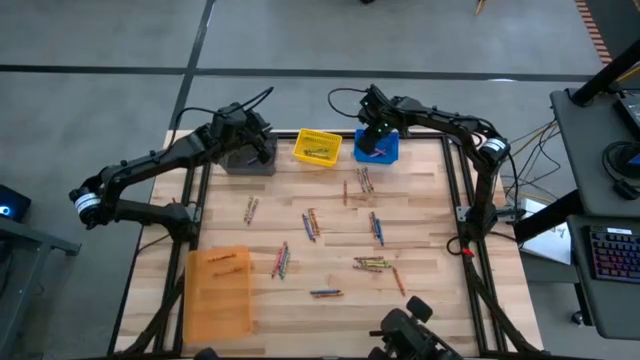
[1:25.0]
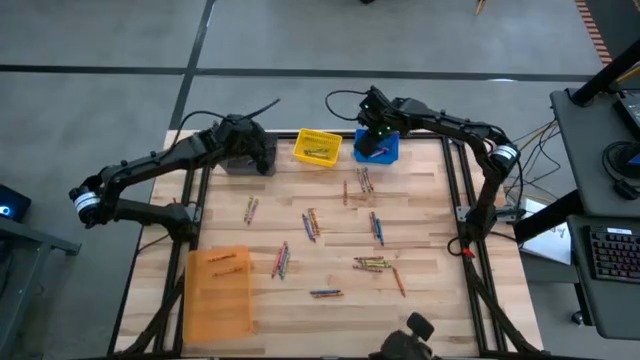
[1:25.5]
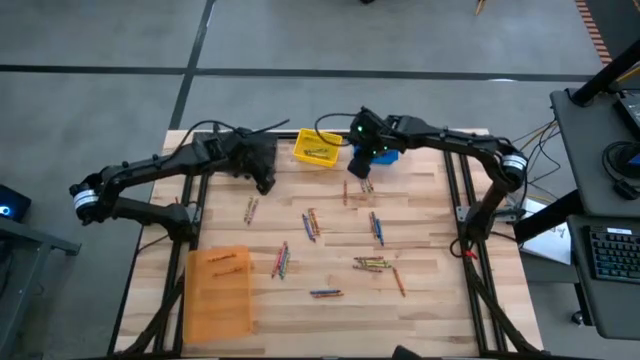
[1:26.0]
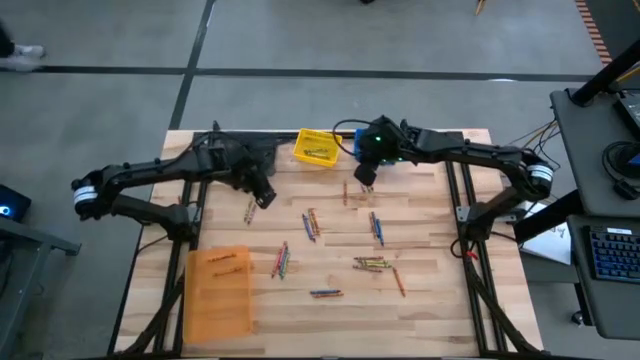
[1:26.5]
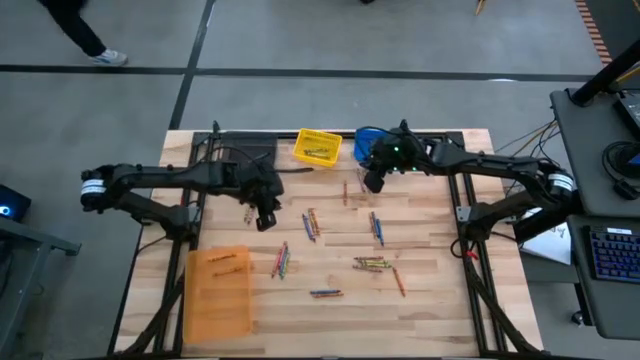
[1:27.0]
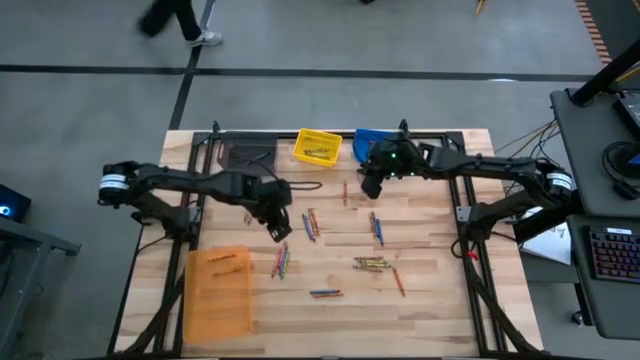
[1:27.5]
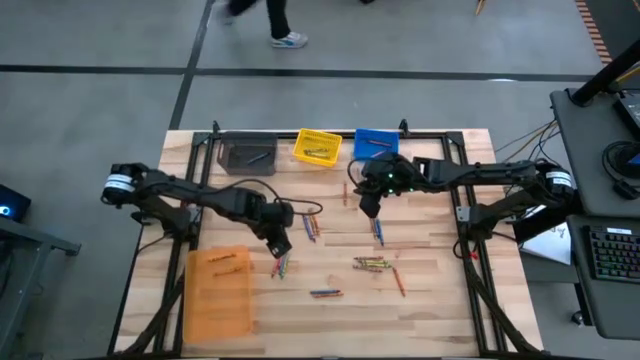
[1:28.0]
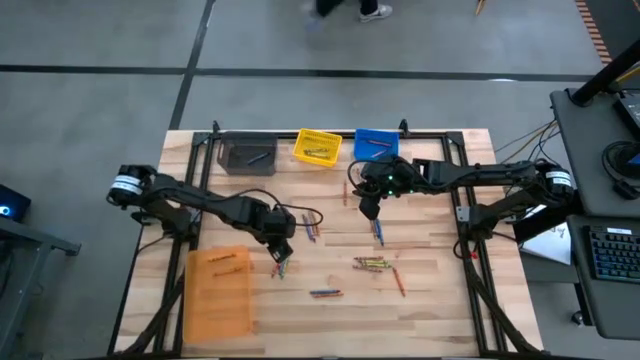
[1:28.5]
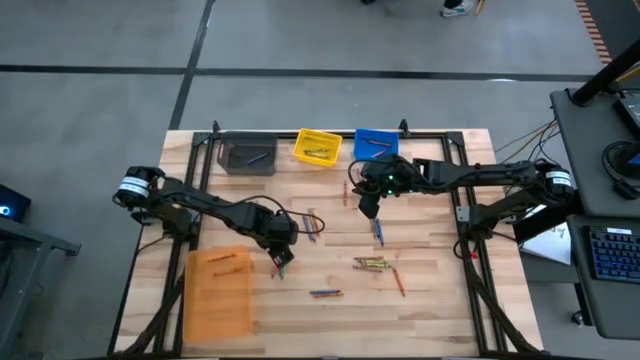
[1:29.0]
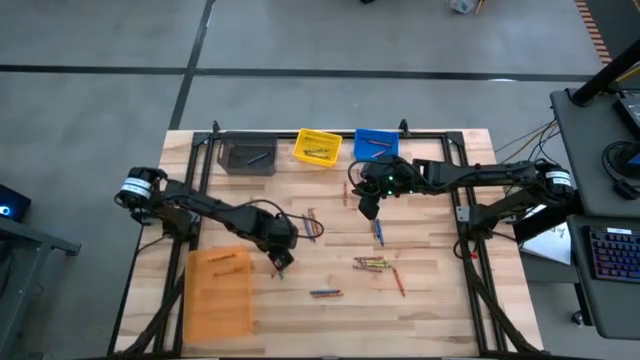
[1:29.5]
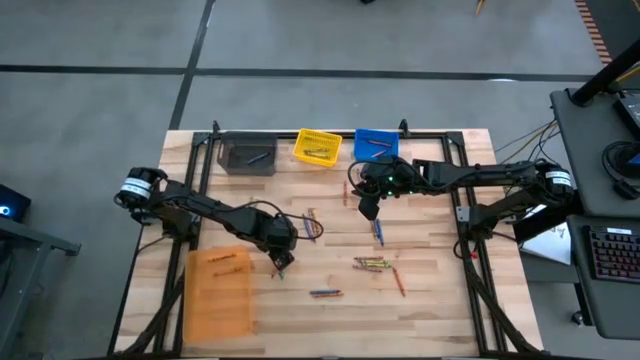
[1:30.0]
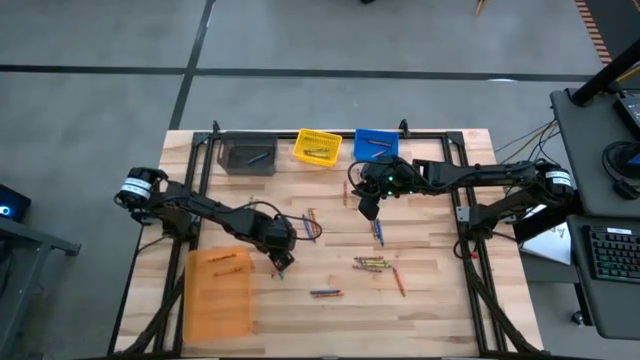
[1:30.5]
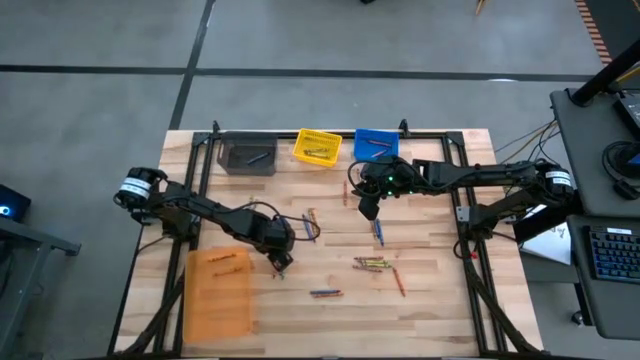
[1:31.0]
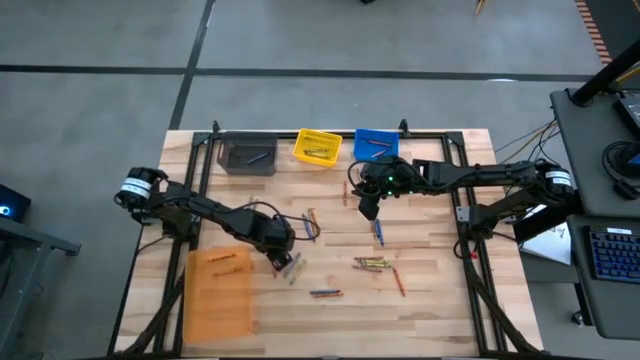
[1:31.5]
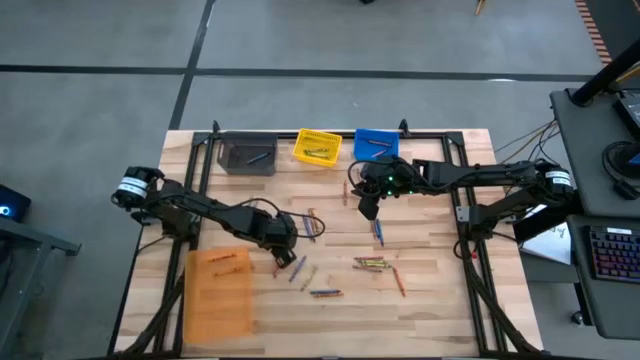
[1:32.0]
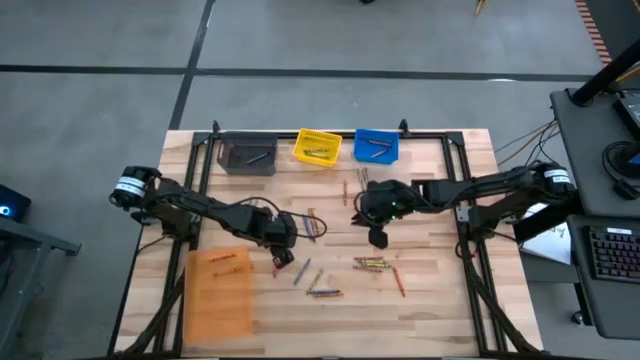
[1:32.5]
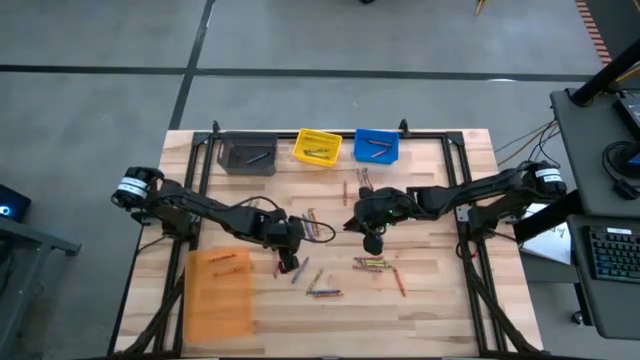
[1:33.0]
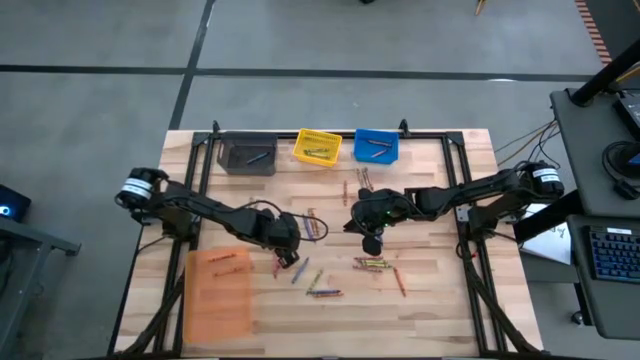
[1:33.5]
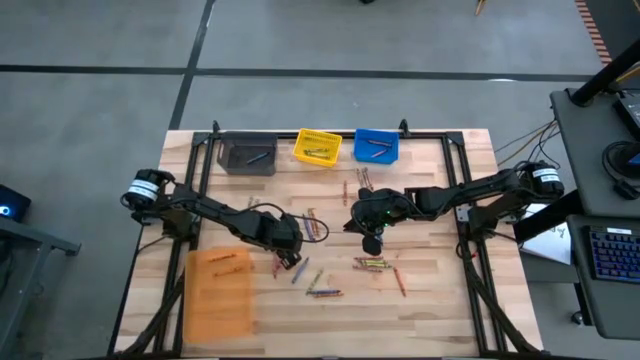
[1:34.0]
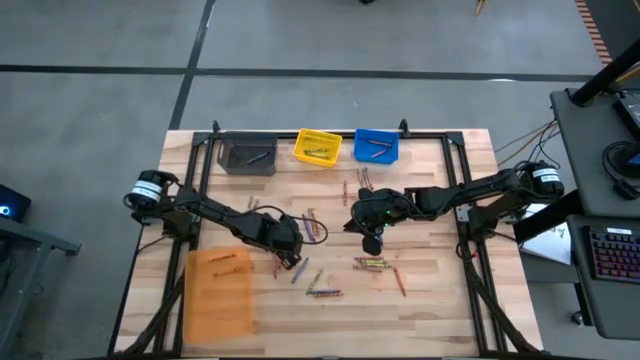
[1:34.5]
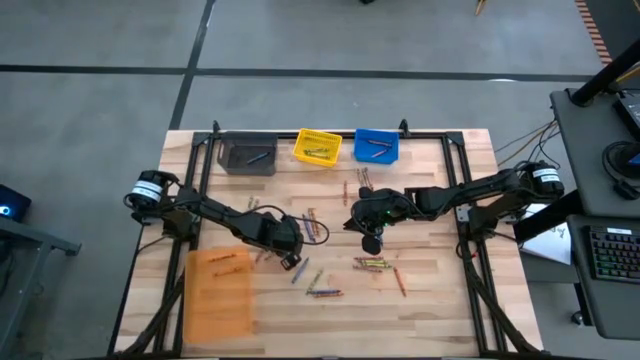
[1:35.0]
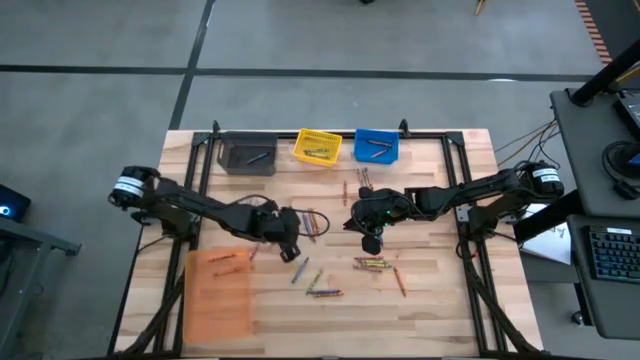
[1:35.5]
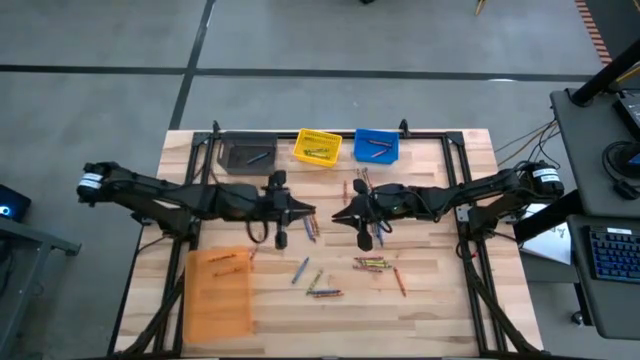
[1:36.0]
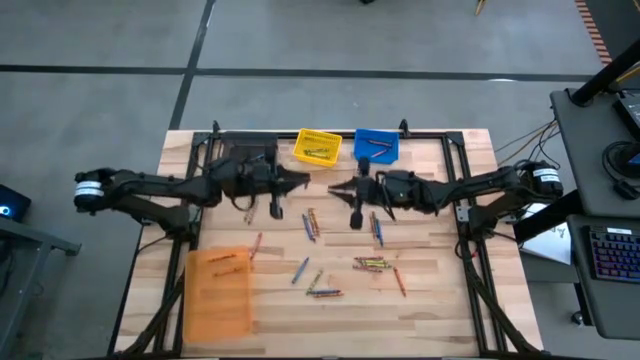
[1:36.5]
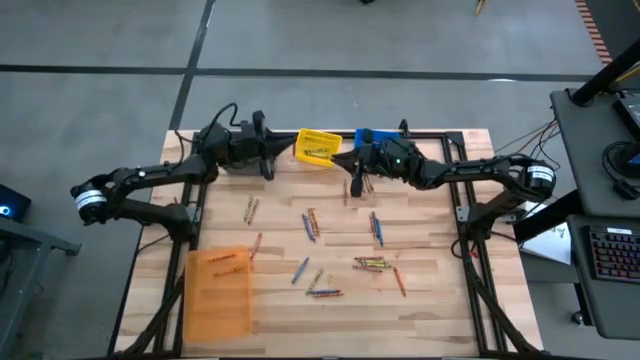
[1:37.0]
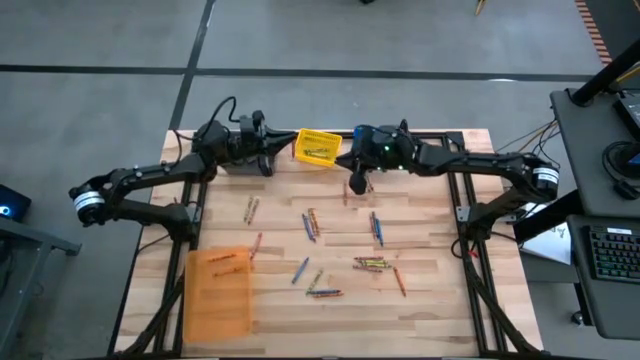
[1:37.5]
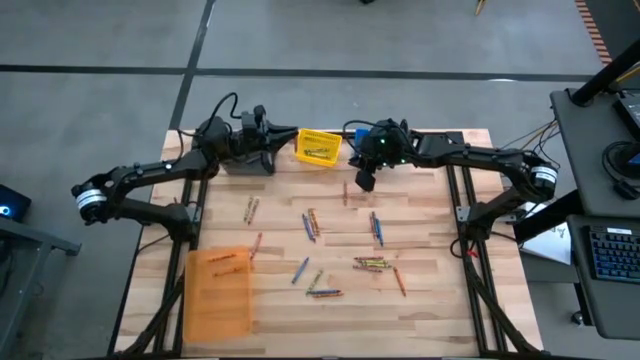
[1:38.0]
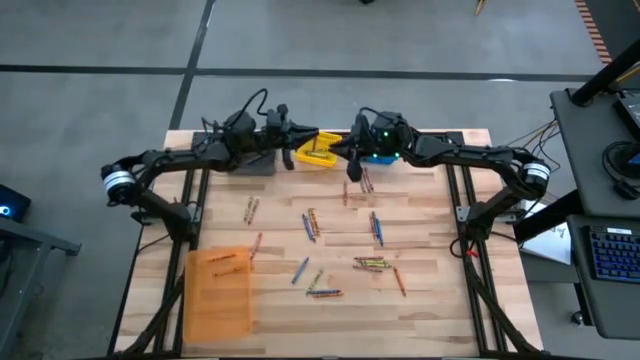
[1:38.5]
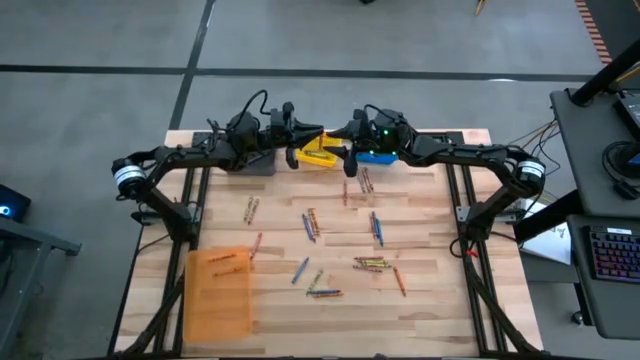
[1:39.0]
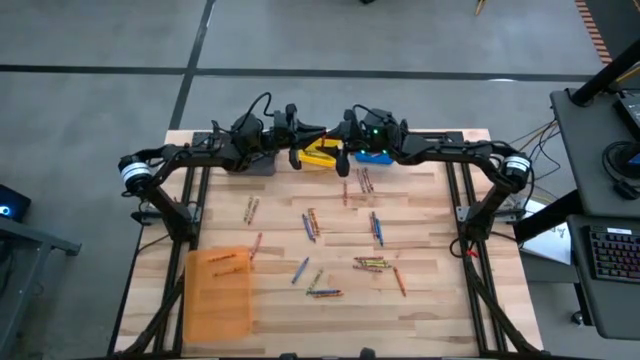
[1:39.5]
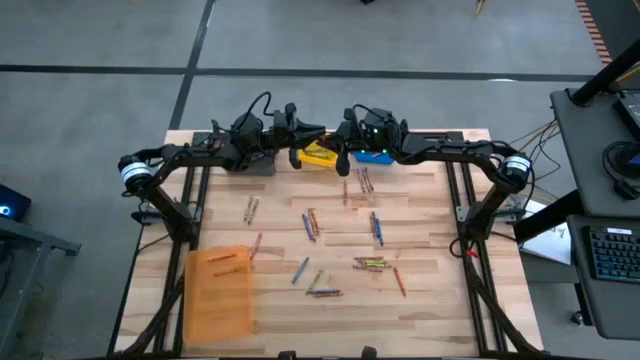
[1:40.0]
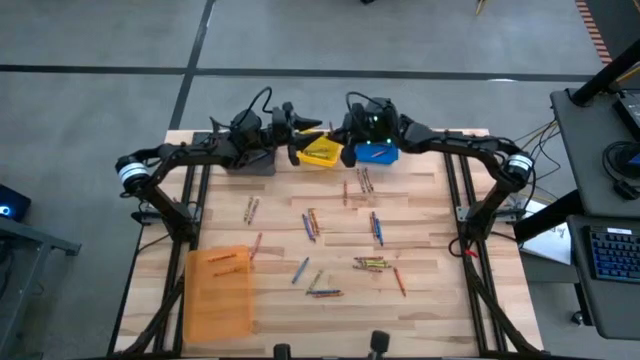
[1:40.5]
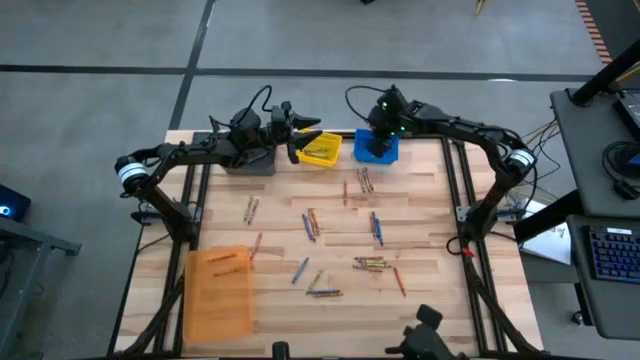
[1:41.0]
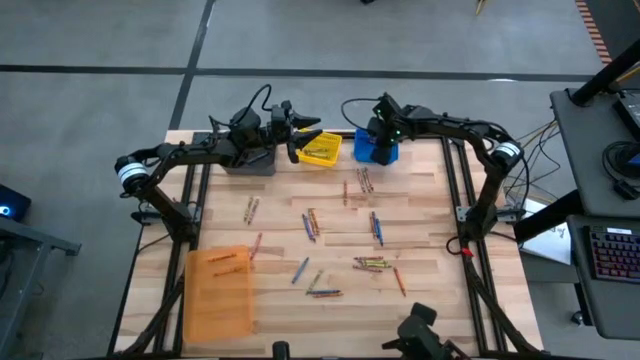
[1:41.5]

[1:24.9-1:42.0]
Task: Sort crayons
Put the red crayon into the blue bin

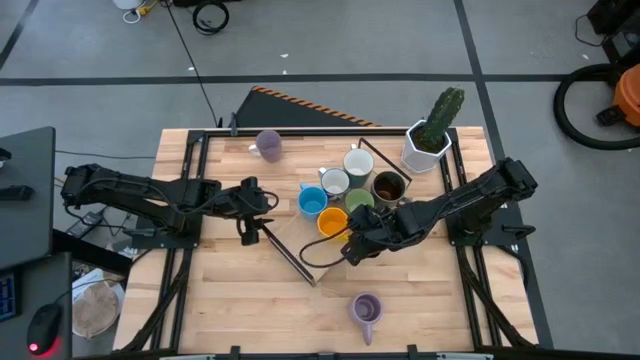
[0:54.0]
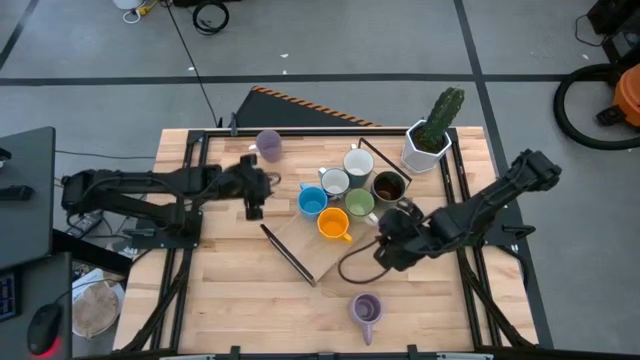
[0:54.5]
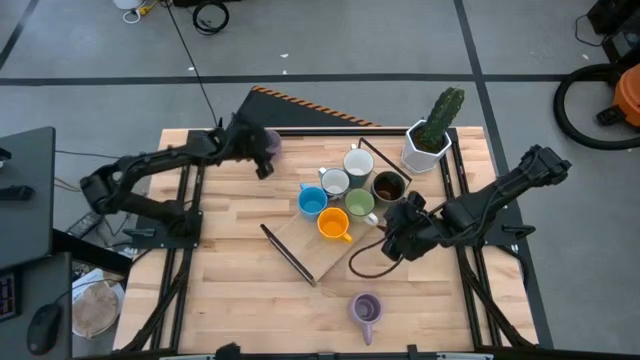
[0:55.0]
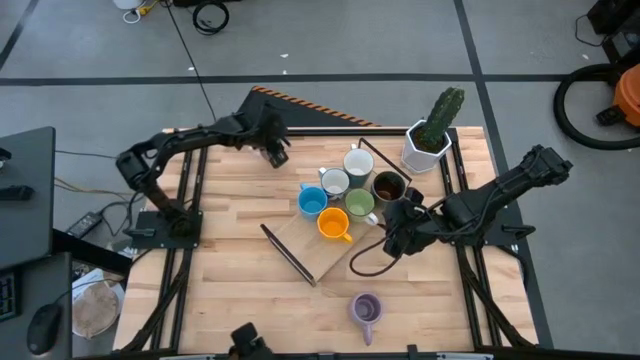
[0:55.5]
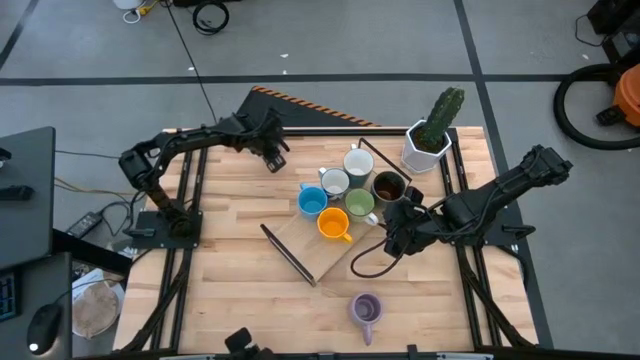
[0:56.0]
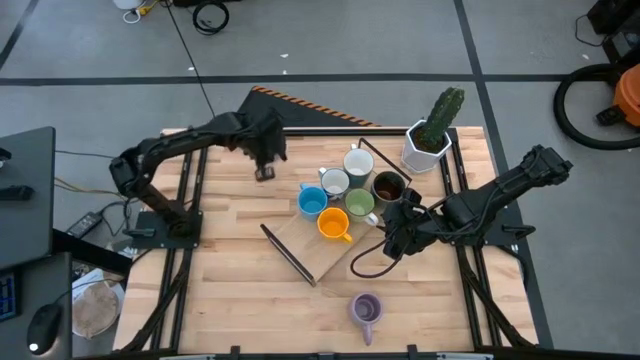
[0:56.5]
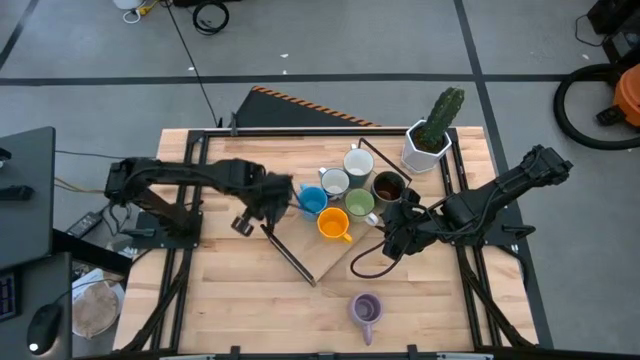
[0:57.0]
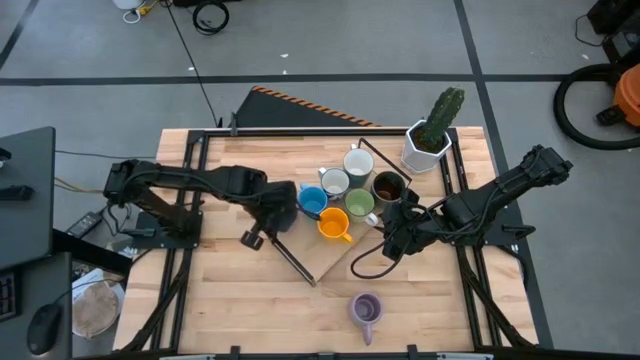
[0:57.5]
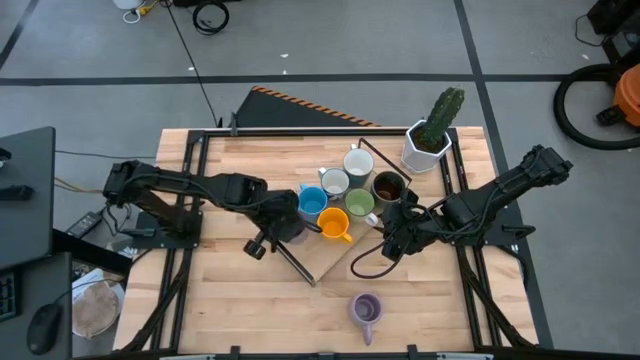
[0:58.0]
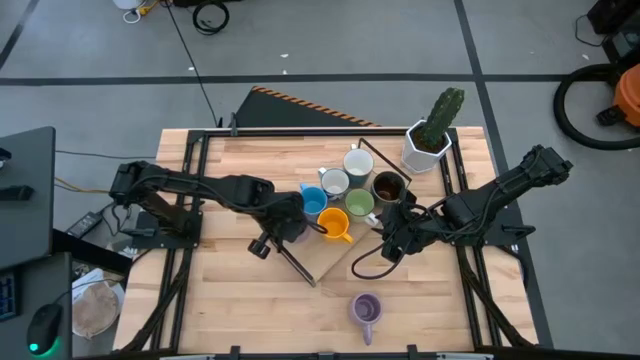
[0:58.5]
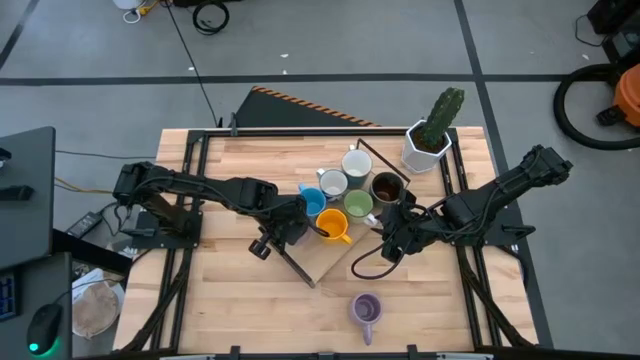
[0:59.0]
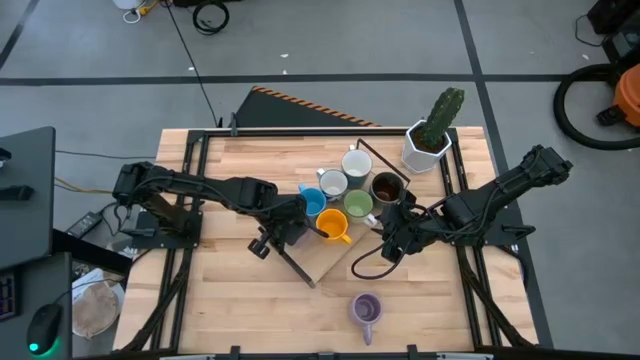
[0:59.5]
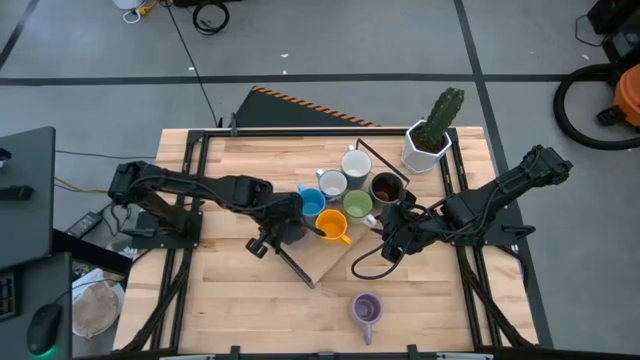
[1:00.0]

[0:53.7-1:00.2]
Task: Place coffee mugs
Put the top violet mug on the shelf
